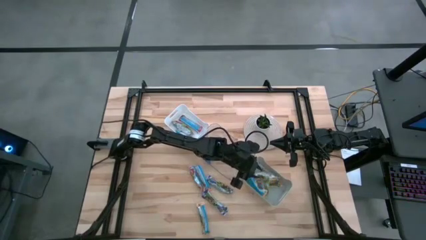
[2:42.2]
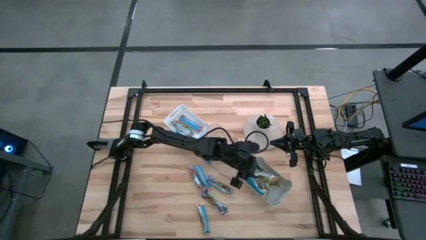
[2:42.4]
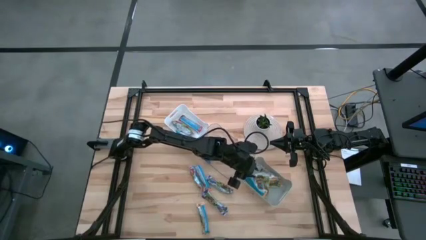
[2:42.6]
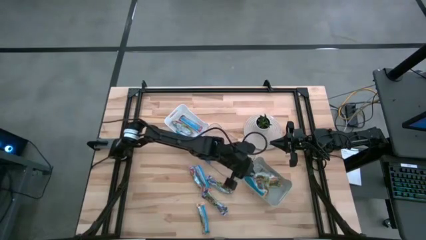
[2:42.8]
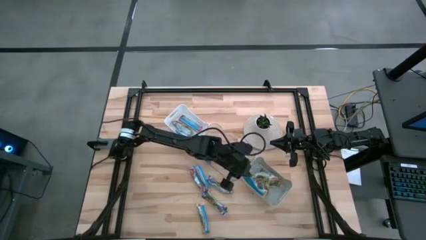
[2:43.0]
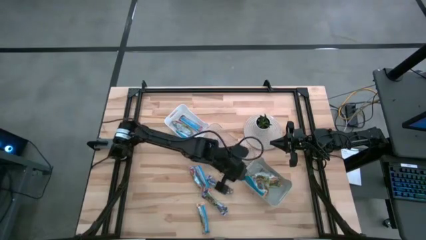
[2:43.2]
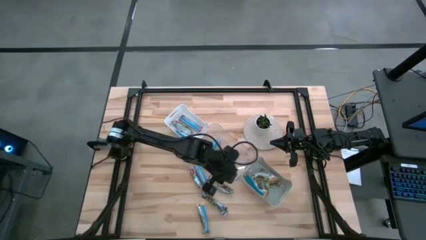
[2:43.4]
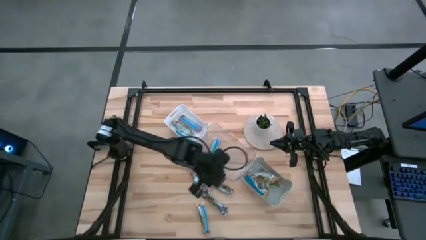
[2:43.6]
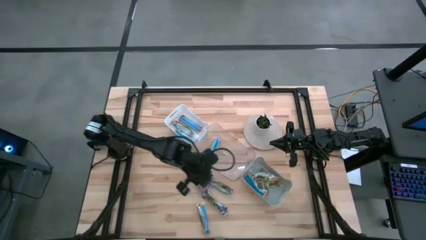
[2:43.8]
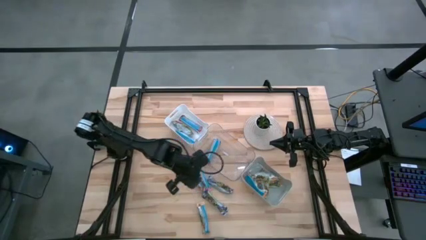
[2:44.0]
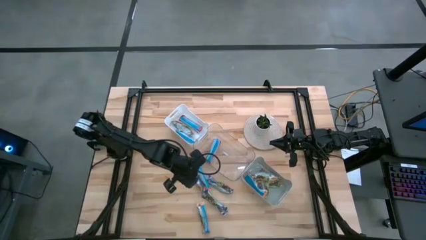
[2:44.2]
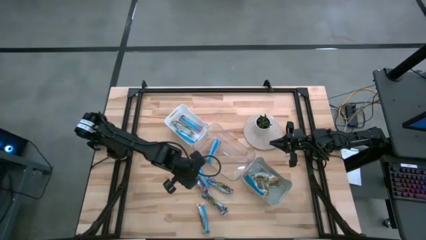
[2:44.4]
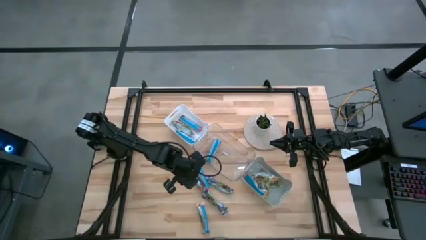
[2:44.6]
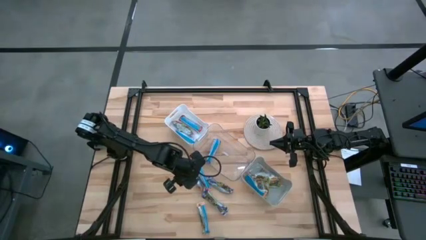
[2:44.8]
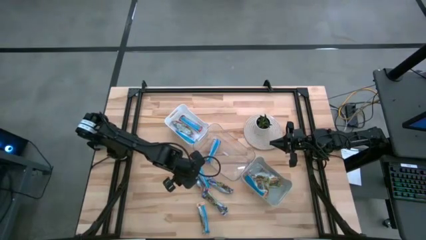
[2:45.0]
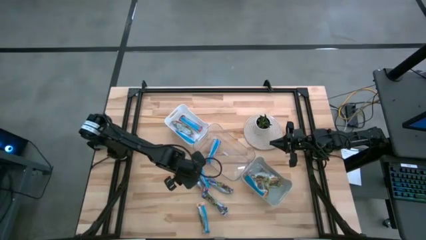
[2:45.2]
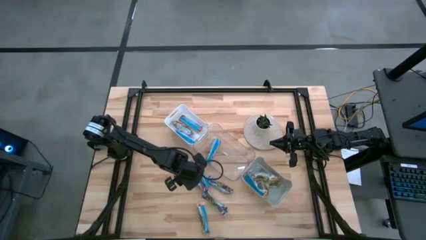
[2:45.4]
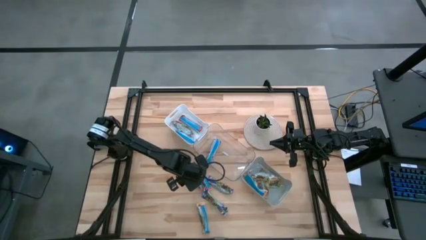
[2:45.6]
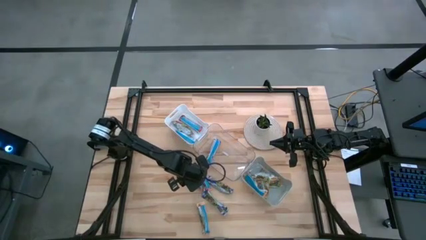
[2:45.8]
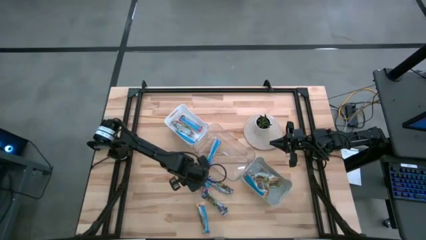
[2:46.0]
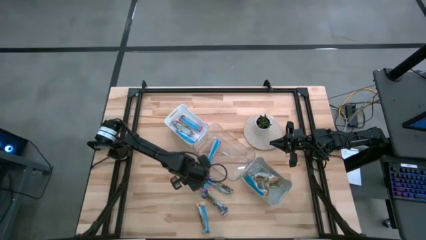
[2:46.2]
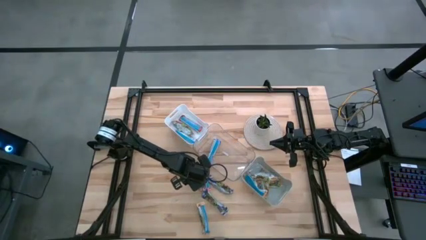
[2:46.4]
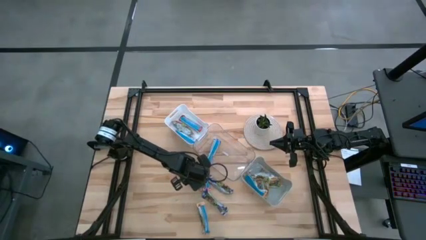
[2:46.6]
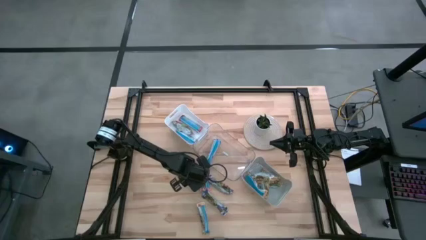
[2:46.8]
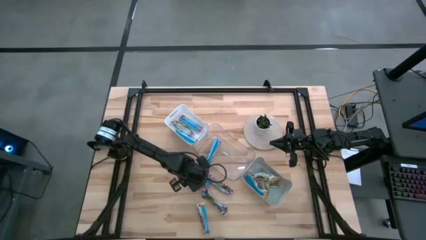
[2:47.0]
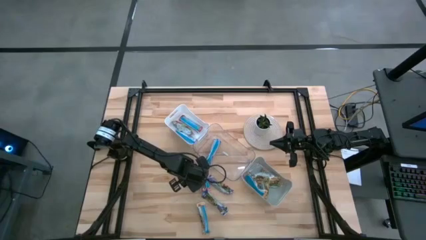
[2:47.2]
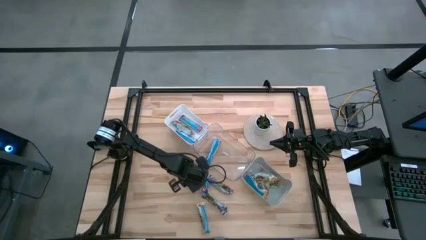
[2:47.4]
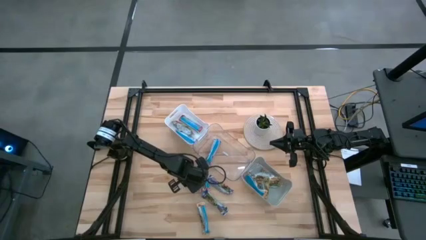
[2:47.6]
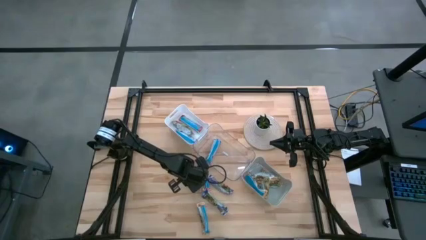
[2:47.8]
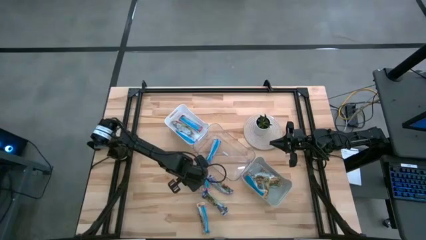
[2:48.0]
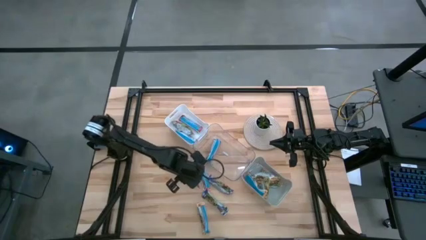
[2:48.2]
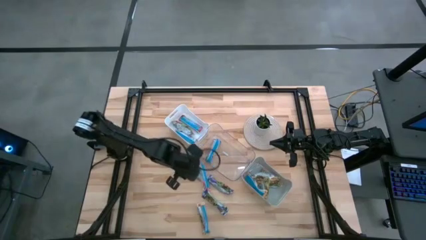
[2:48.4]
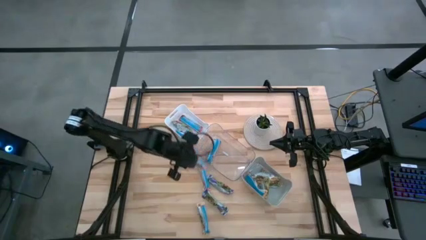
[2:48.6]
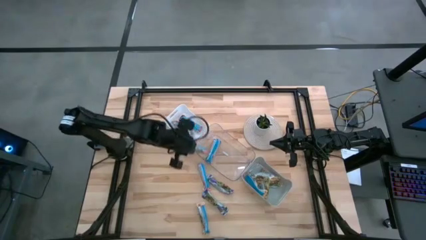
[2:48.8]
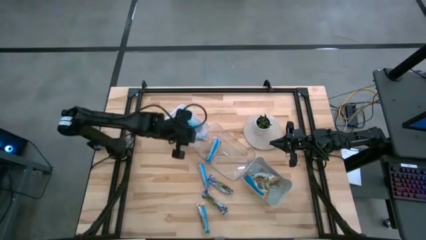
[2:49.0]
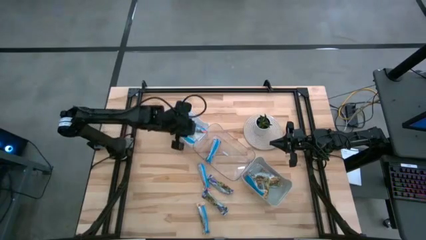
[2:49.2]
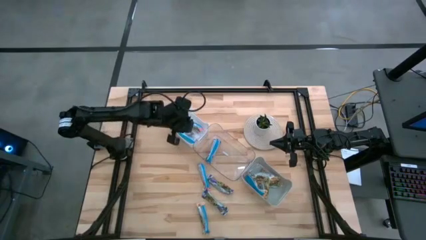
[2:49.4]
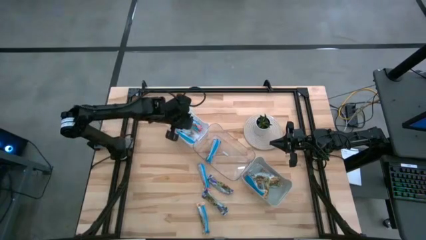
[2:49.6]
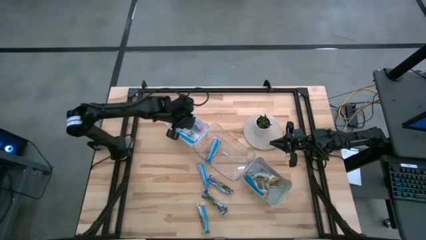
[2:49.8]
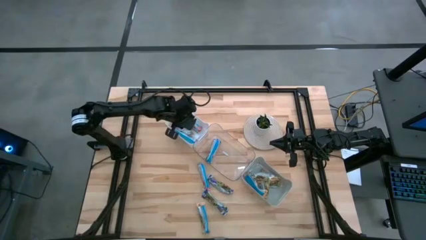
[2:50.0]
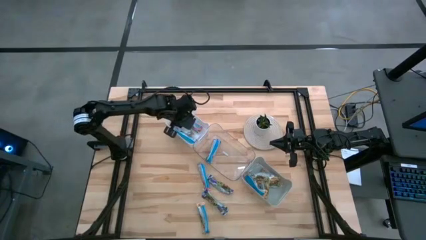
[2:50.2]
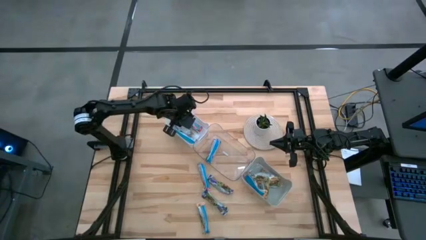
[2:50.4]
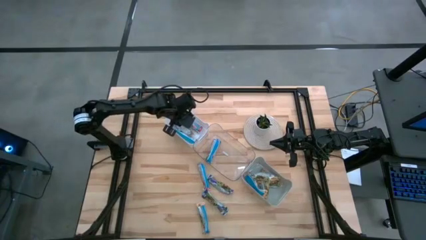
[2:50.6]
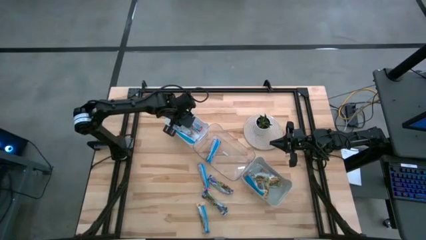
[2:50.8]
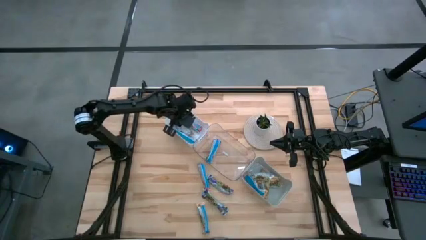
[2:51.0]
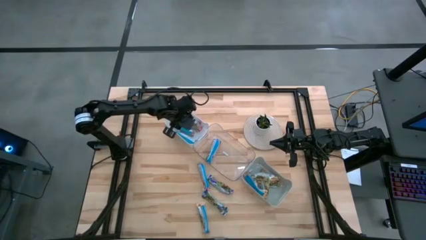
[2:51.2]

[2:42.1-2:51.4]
Task: Pick and place Granola Bars by type
Put the red granola bar into the white bin

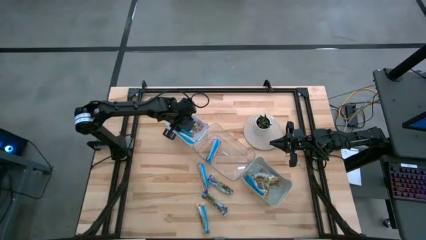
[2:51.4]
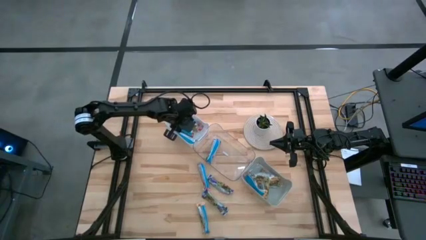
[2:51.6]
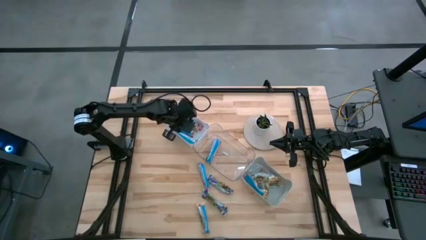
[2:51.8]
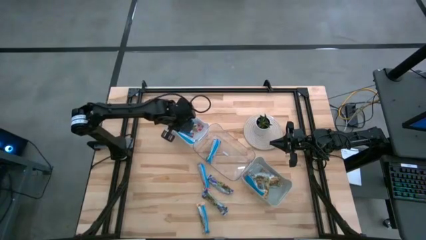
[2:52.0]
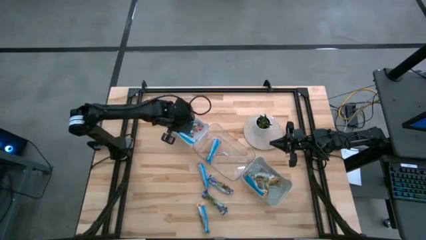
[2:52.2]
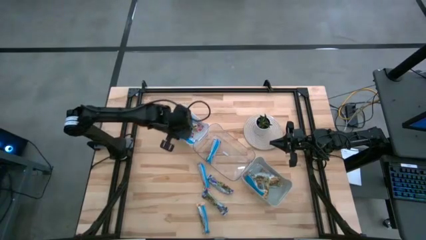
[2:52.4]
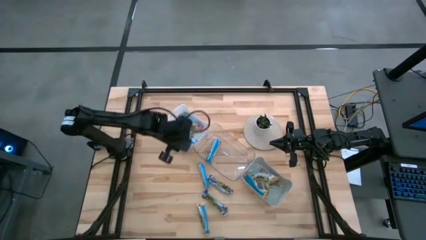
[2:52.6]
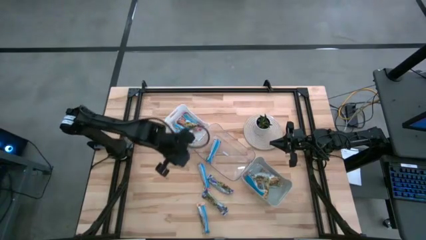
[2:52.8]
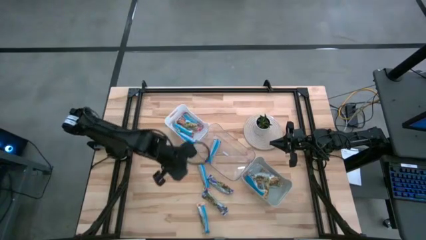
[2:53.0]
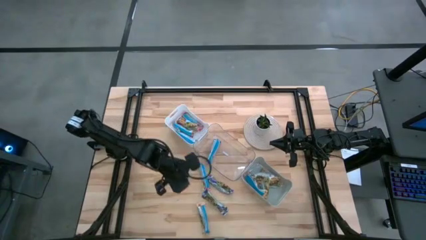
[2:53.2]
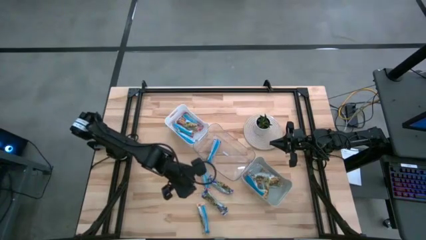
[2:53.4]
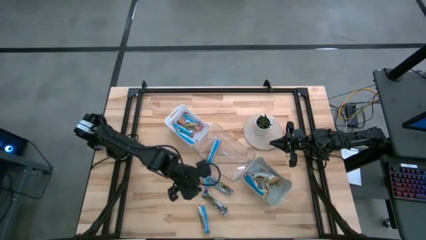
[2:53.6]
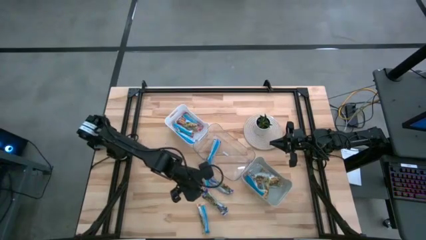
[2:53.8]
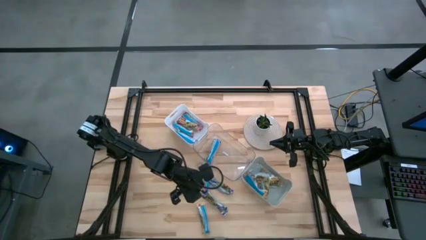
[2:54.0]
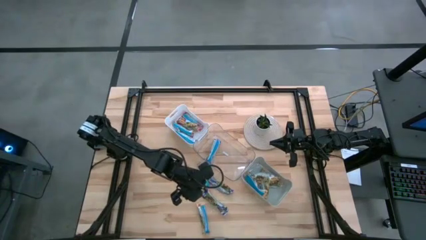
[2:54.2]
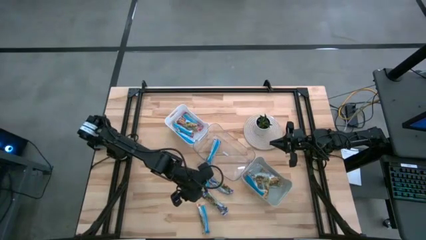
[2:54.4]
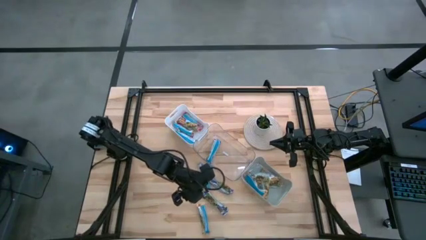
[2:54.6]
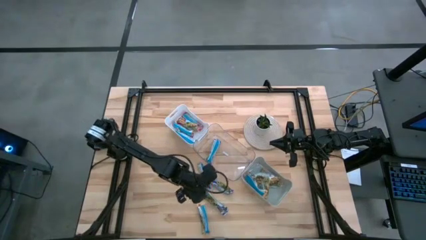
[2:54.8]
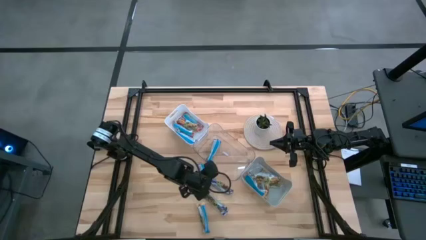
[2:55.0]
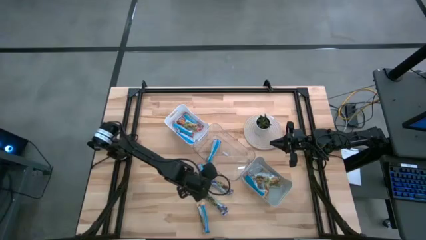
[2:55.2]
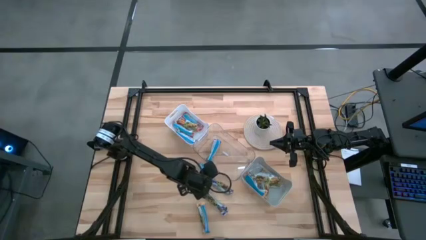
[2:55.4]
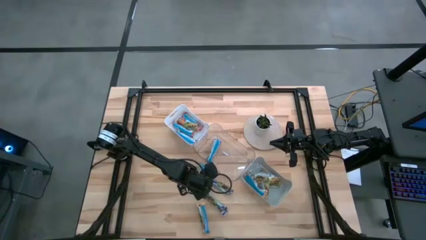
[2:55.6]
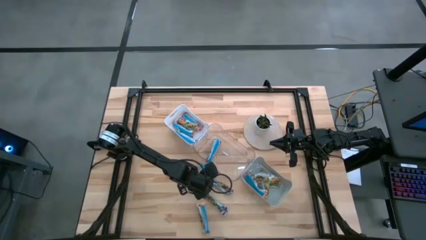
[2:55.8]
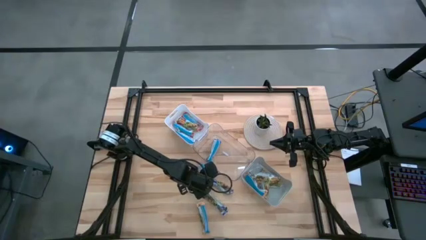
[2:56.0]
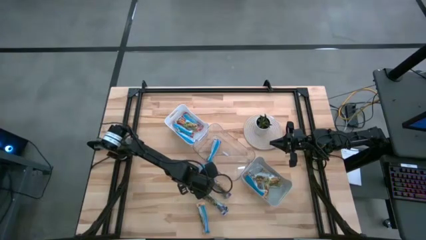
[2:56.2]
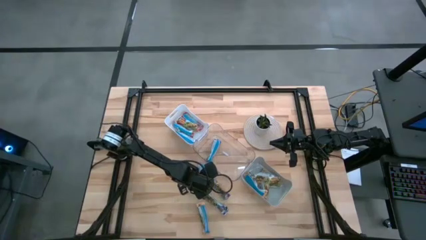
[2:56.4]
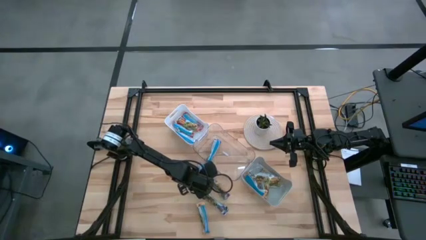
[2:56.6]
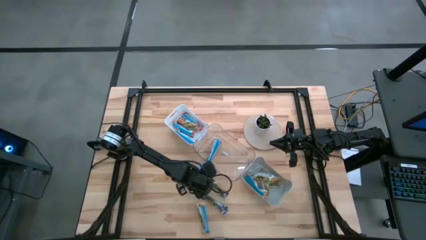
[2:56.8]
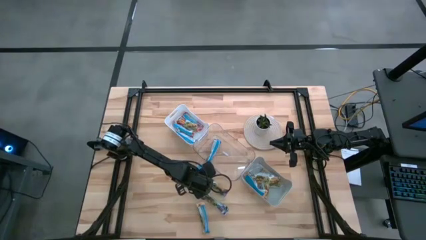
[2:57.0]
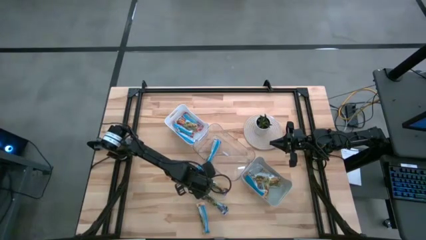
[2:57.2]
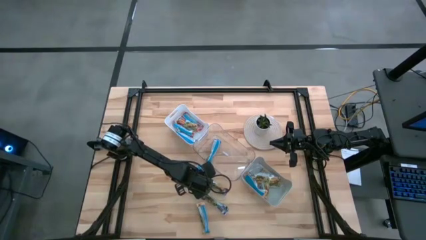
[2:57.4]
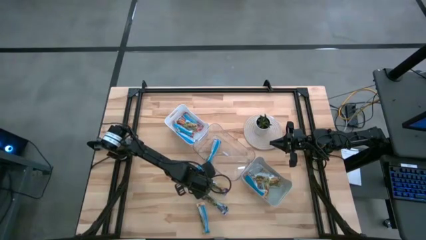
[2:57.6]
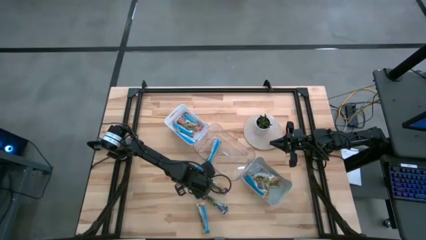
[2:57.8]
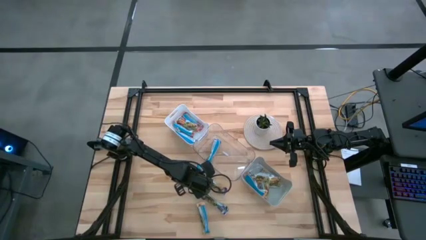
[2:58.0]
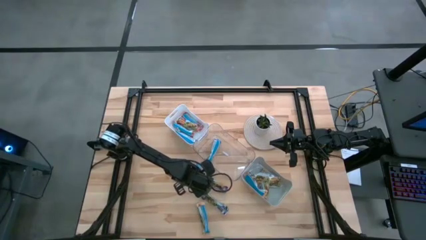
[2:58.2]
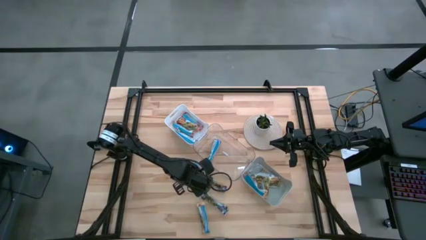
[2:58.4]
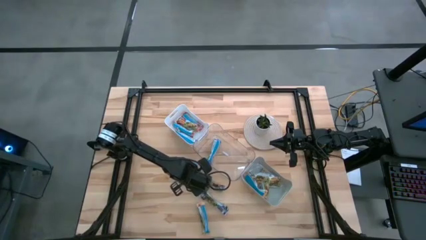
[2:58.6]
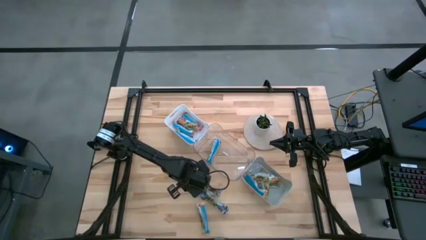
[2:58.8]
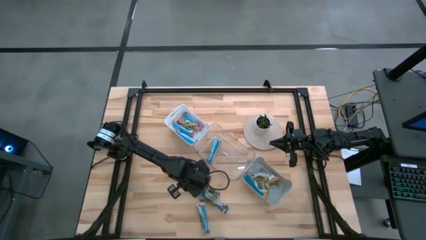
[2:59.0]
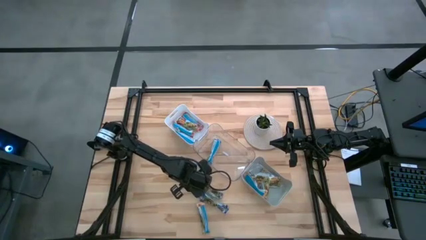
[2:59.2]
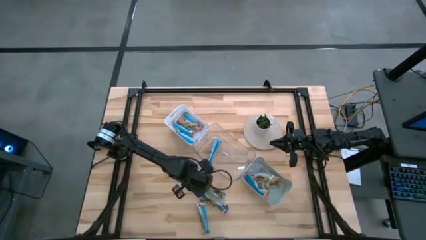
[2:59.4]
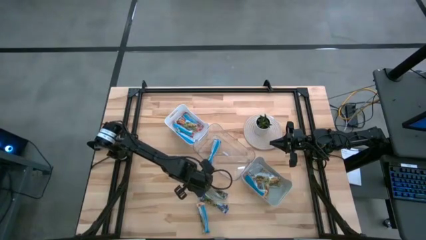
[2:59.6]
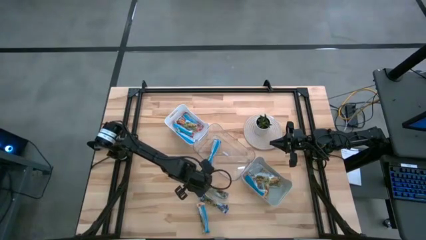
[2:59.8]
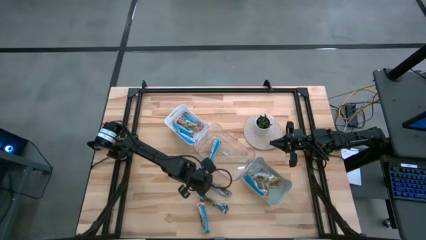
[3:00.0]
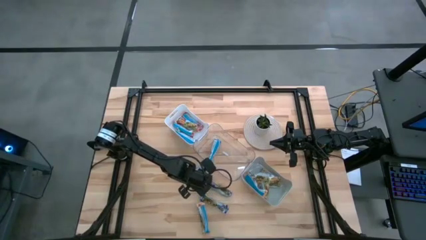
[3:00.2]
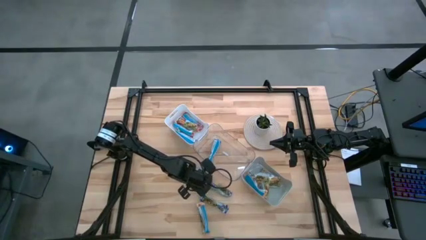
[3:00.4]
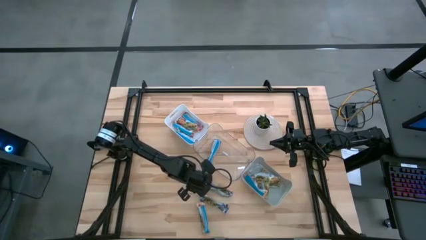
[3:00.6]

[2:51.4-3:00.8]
Put the red granola bar into the white bin
